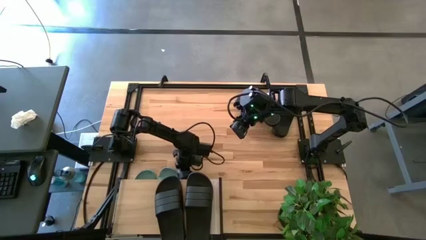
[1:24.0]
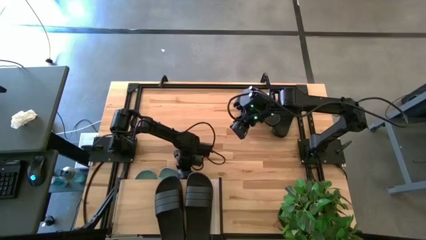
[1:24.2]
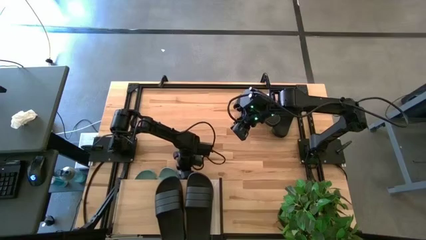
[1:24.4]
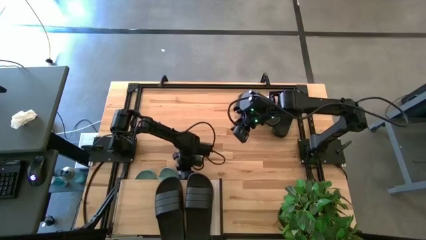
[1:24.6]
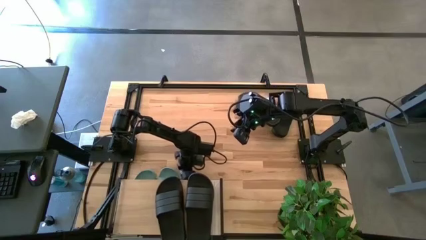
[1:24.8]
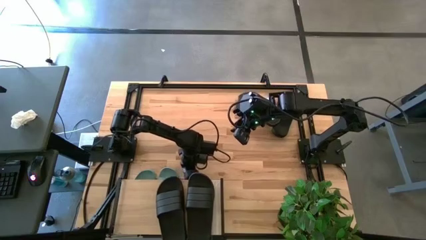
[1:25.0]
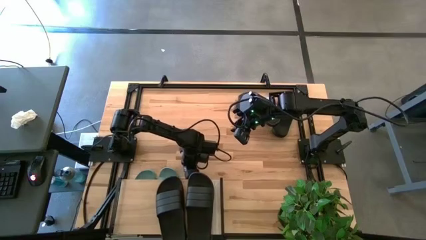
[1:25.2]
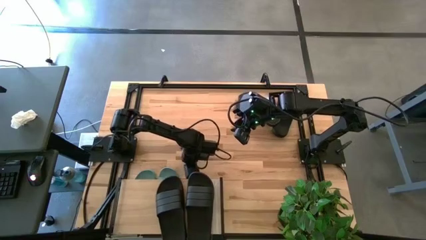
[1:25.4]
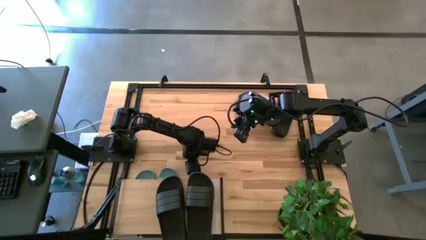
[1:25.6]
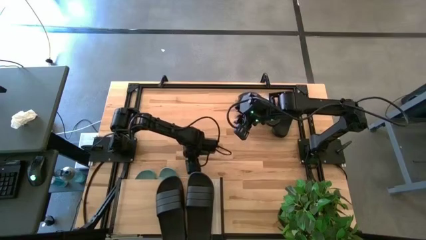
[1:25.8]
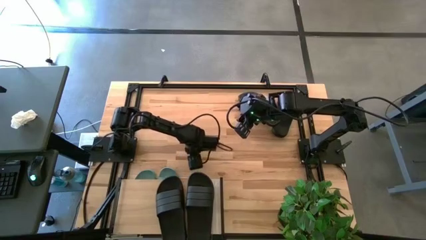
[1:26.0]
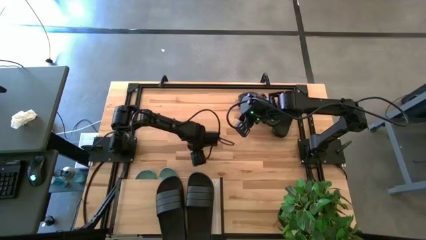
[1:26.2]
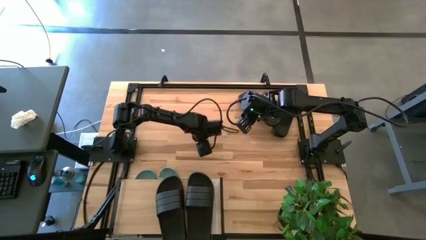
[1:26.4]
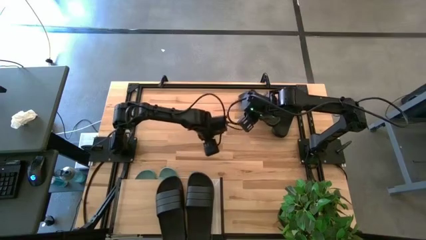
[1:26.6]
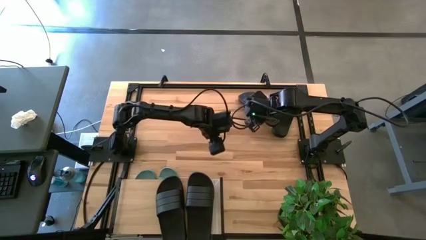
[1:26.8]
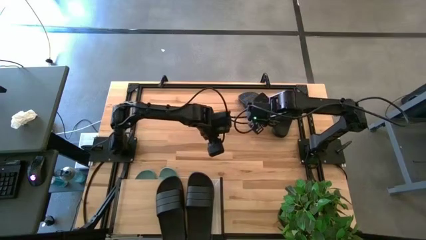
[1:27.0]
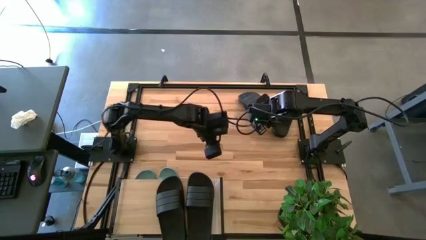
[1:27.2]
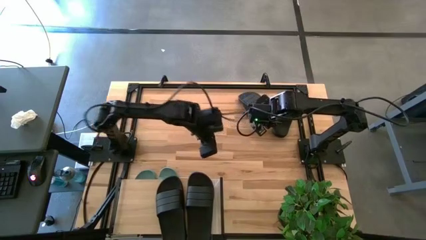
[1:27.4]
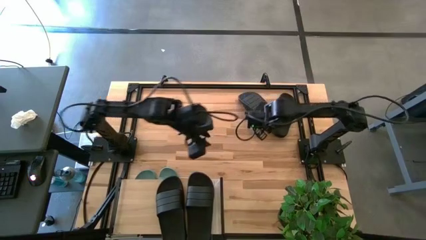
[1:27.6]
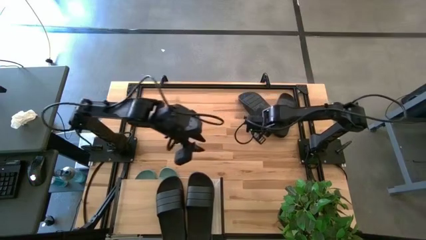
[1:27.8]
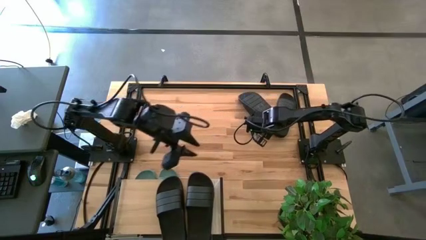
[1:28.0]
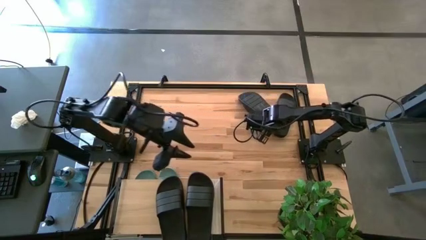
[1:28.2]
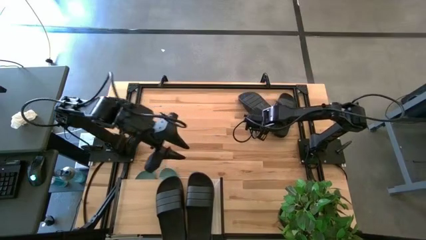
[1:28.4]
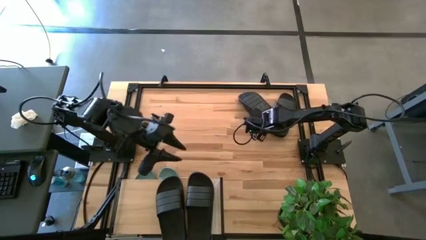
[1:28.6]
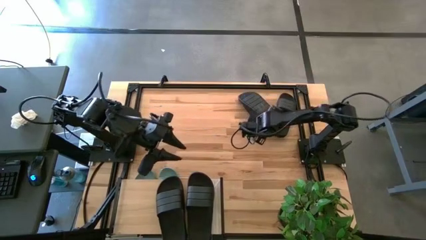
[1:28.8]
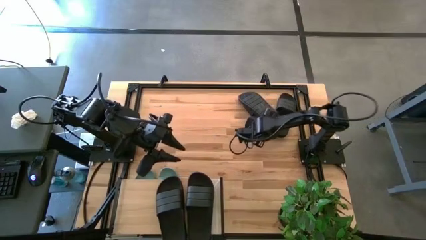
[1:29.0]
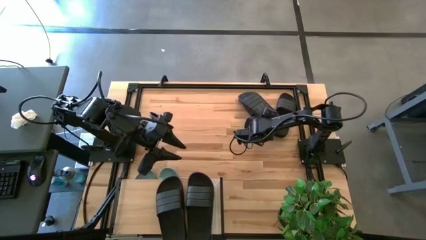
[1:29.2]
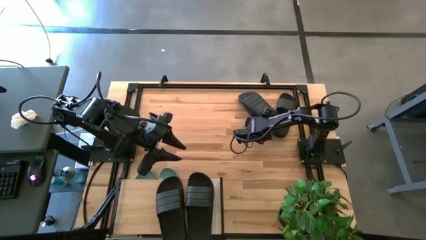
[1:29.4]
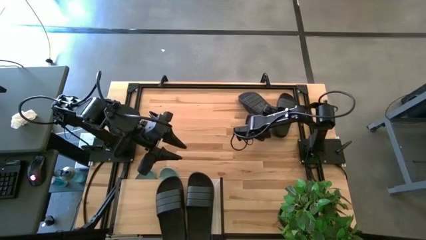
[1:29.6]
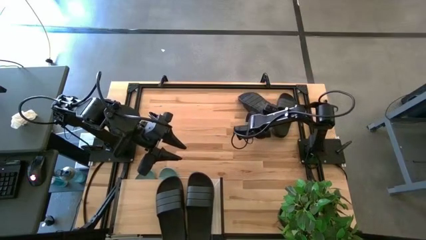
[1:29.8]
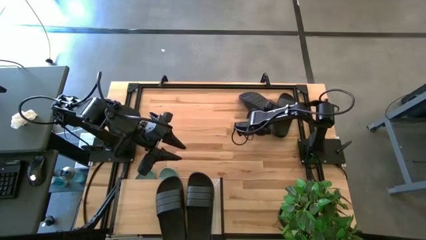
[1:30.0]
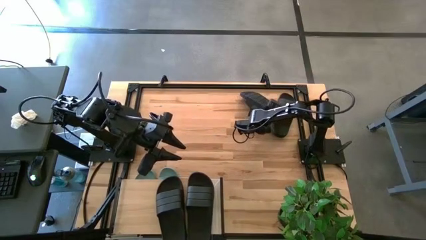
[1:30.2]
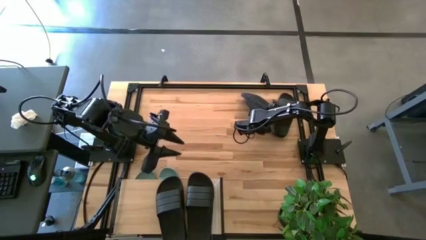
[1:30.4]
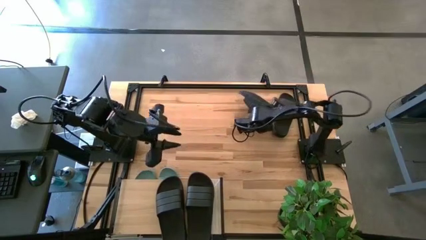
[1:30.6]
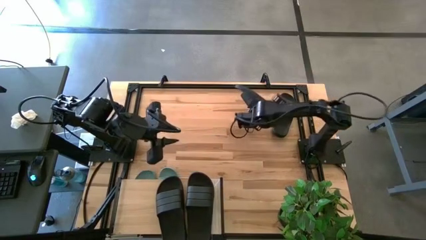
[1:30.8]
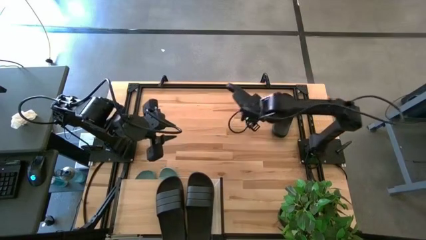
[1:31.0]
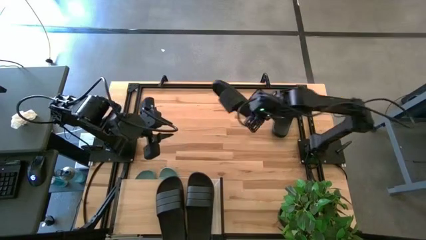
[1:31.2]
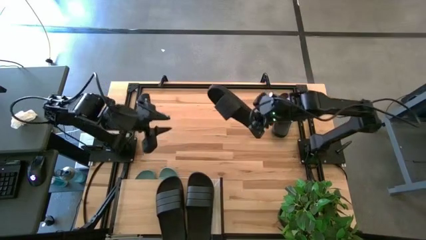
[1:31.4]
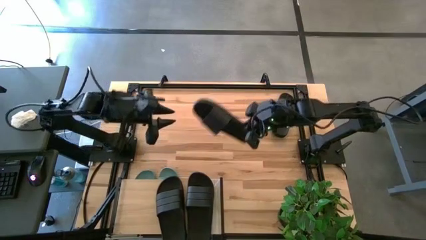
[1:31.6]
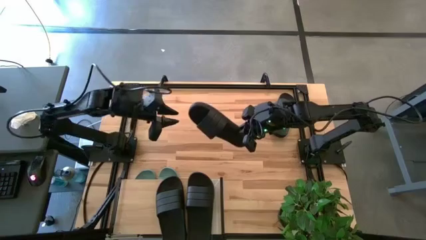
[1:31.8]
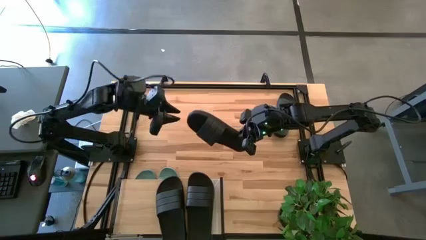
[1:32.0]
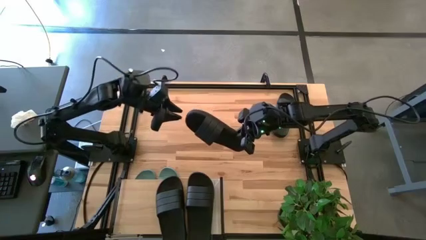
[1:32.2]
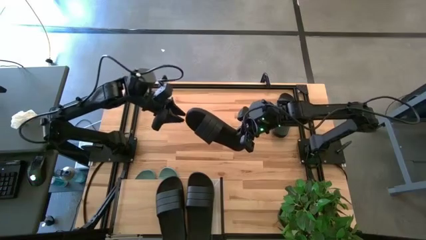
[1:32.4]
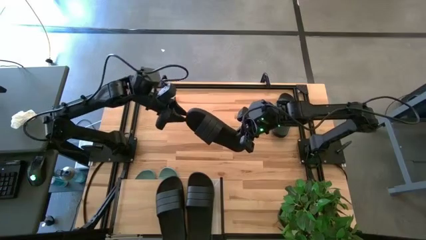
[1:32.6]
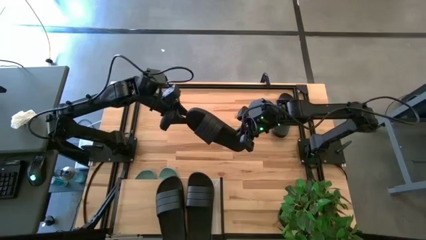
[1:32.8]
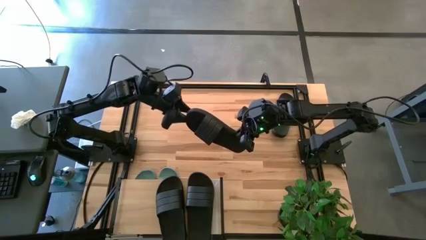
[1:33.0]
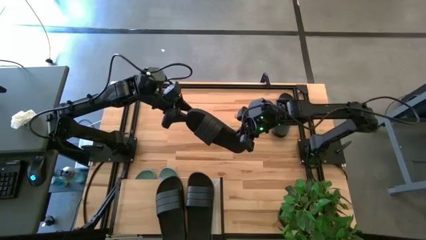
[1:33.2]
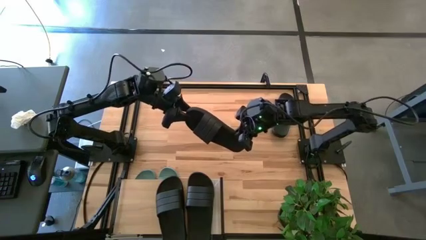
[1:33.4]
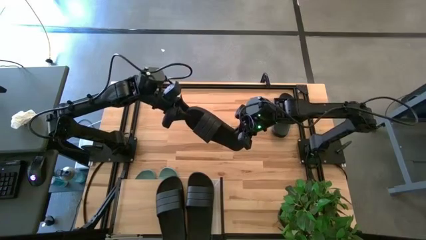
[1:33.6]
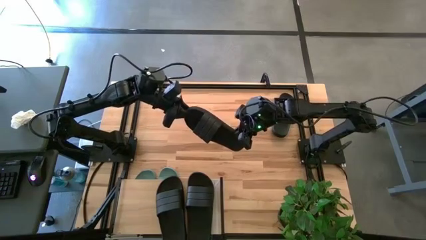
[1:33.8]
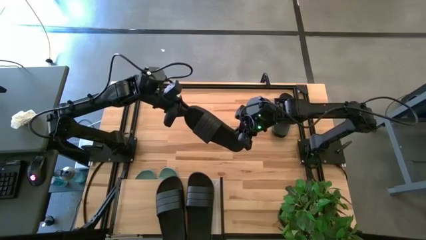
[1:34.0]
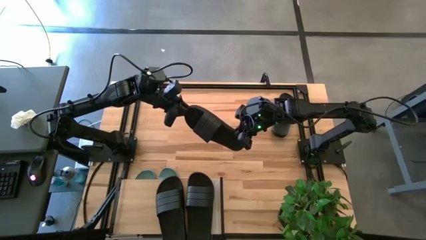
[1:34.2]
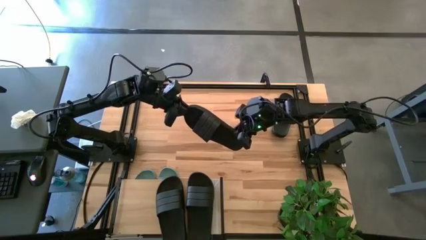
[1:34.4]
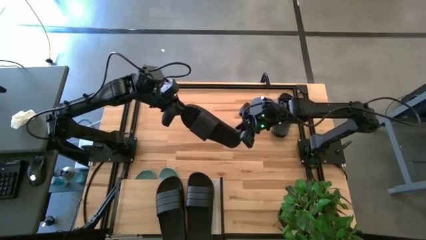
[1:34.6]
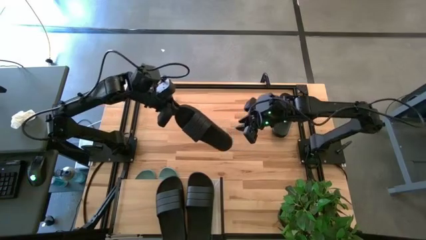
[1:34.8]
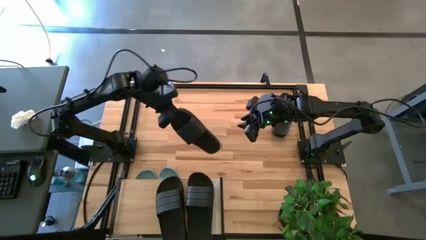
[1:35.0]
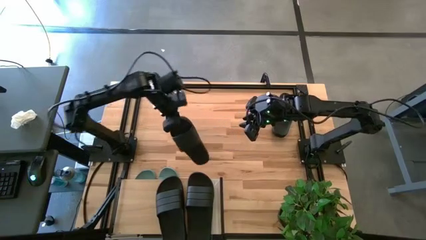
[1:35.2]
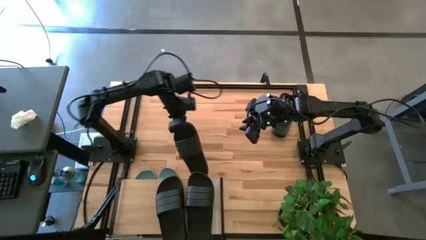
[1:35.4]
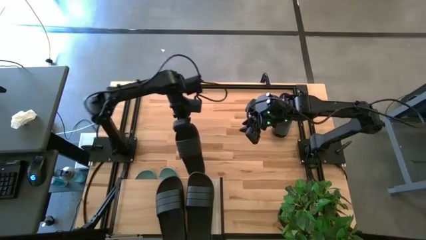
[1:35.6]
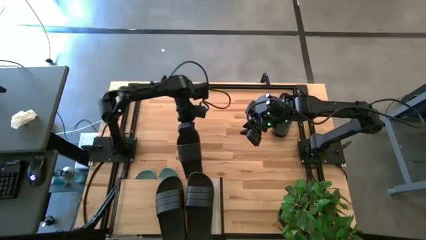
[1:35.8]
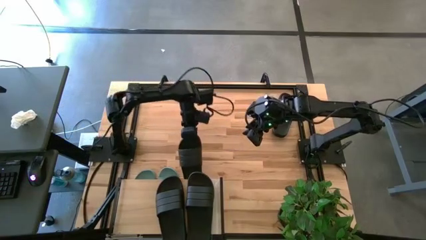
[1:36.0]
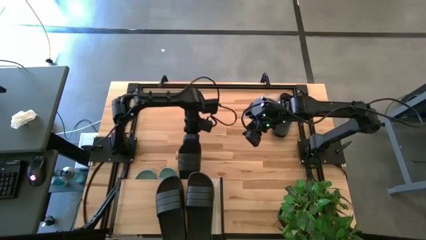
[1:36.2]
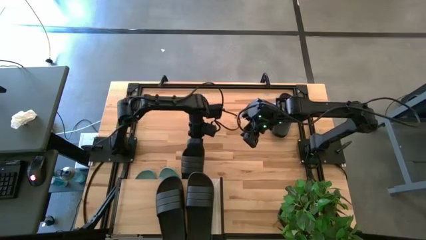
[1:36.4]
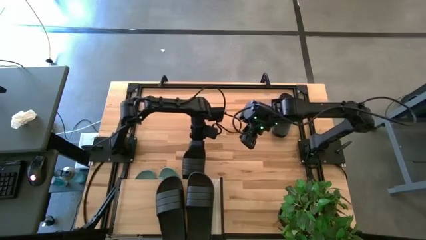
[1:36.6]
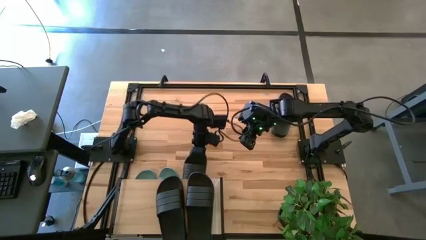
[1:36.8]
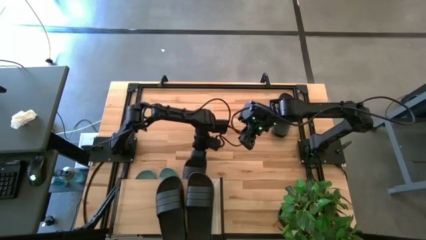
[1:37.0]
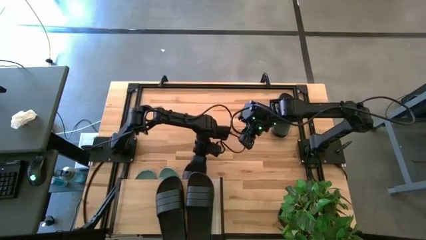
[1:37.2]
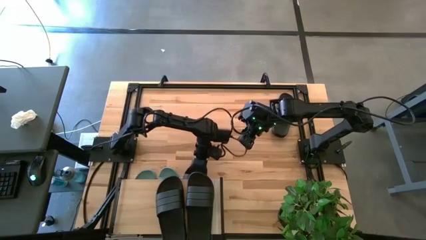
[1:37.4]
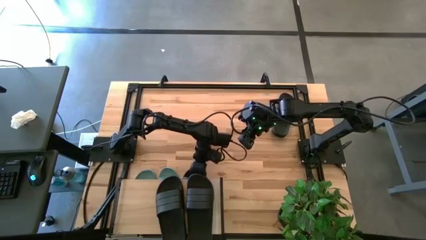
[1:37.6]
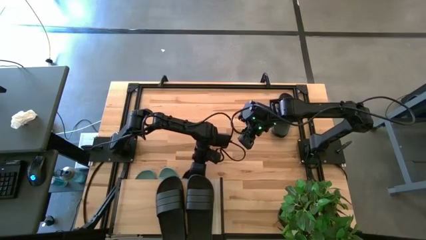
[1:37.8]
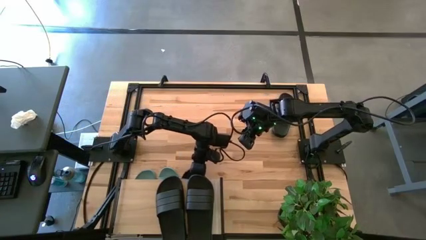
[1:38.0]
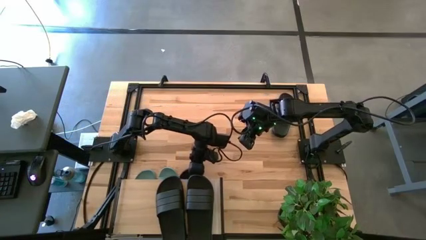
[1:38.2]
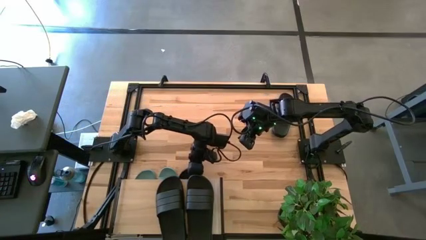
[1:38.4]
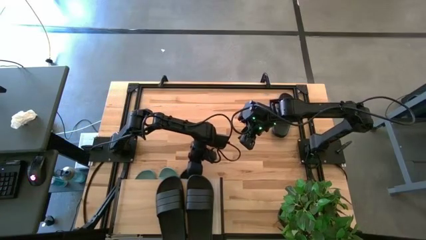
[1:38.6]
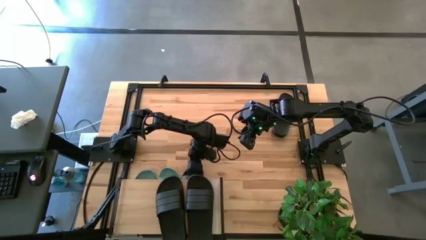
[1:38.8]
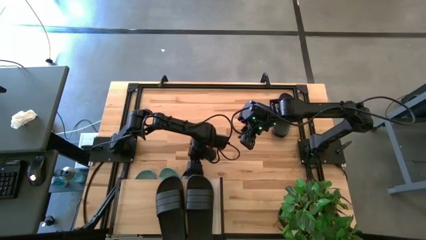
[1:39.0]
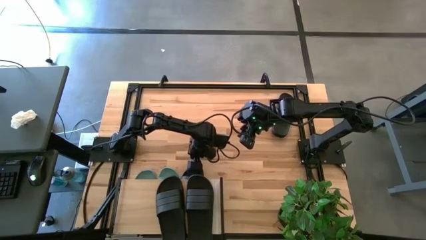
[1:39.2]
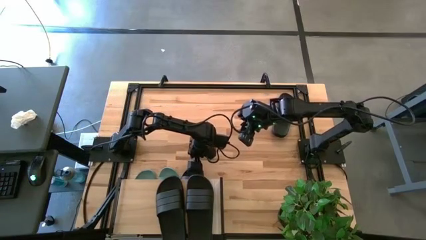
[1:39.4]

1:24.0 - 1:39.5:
Task: Pick and place slides into the shelf
Put the black slipper under the shelf
